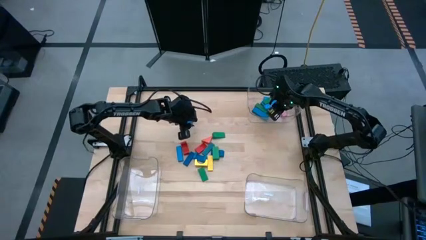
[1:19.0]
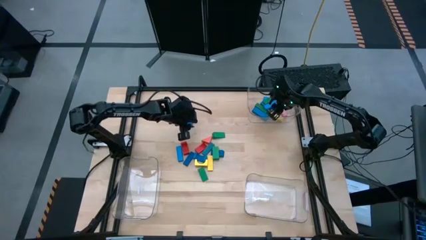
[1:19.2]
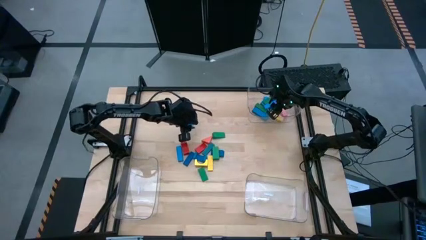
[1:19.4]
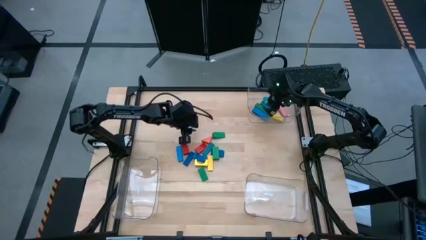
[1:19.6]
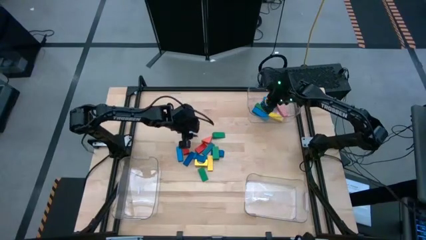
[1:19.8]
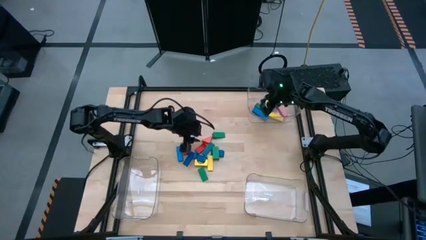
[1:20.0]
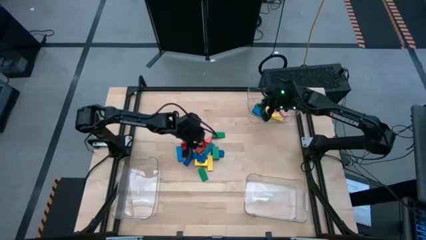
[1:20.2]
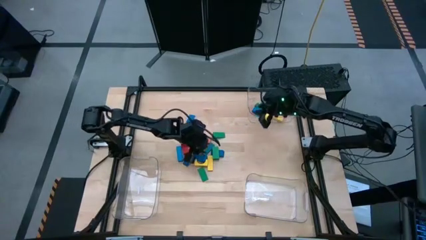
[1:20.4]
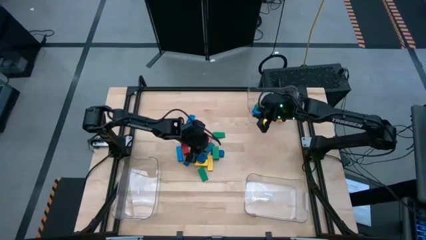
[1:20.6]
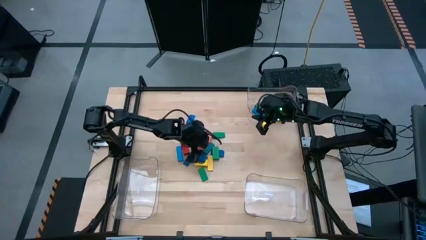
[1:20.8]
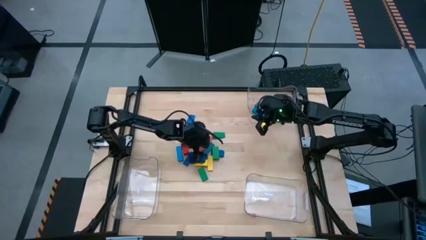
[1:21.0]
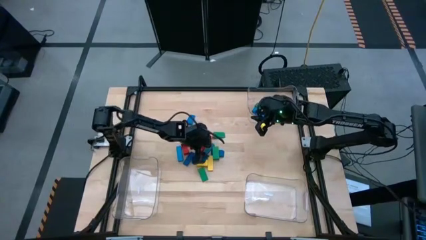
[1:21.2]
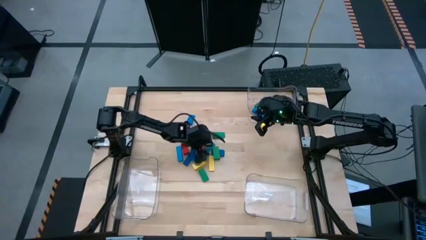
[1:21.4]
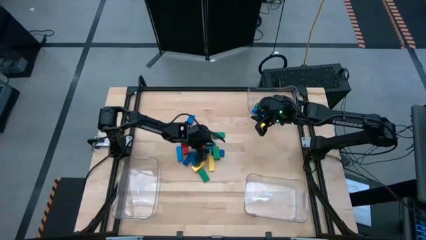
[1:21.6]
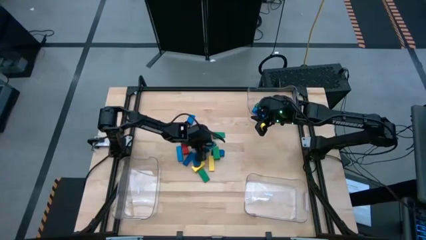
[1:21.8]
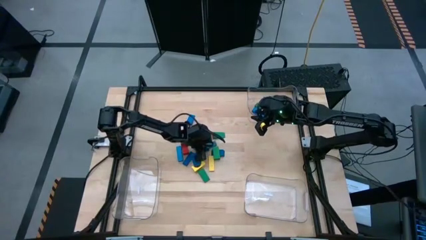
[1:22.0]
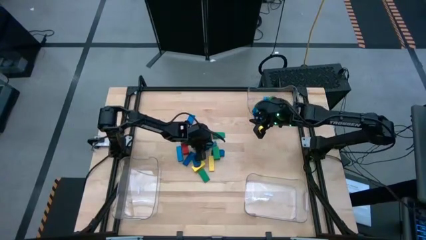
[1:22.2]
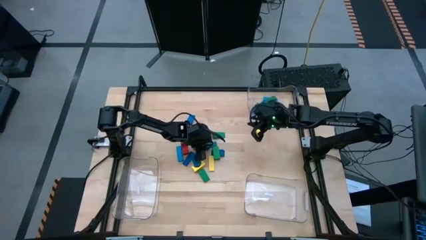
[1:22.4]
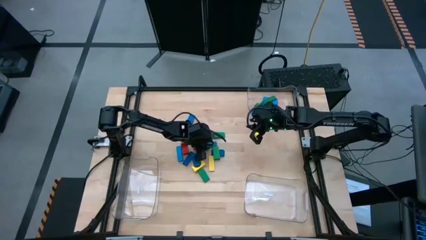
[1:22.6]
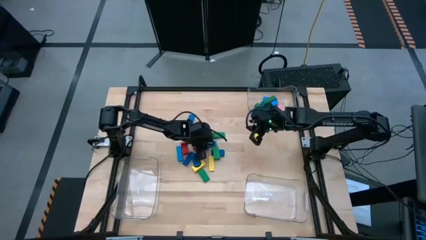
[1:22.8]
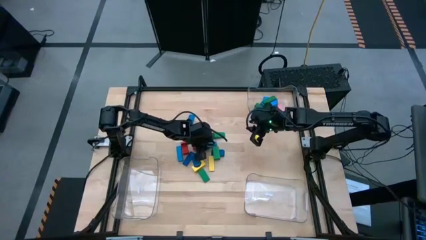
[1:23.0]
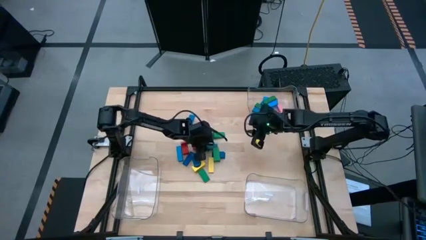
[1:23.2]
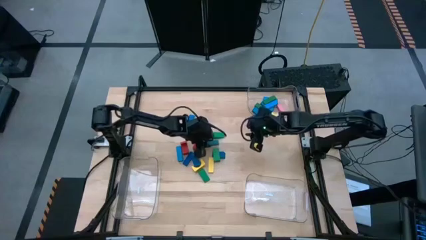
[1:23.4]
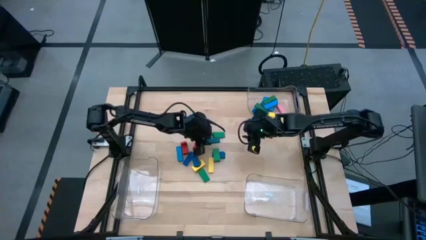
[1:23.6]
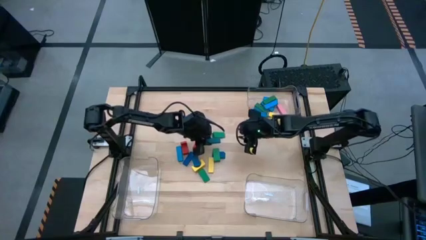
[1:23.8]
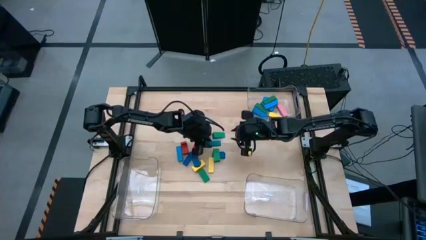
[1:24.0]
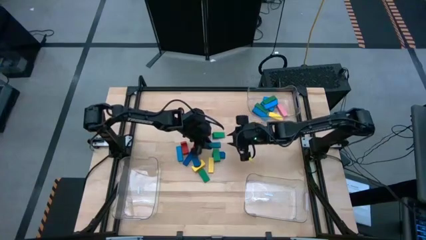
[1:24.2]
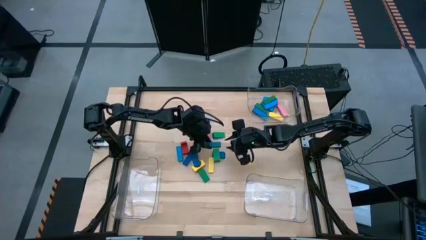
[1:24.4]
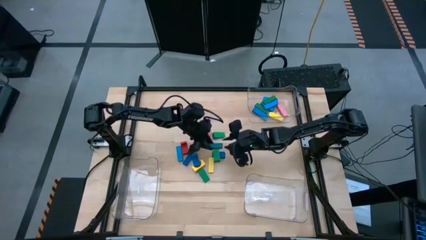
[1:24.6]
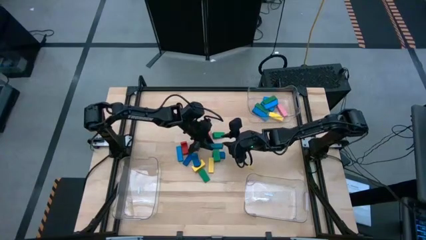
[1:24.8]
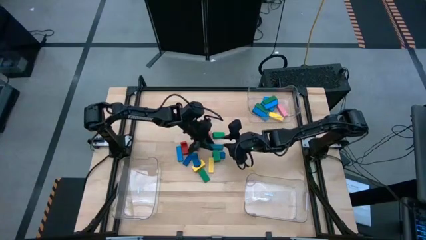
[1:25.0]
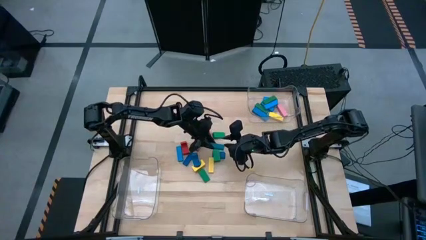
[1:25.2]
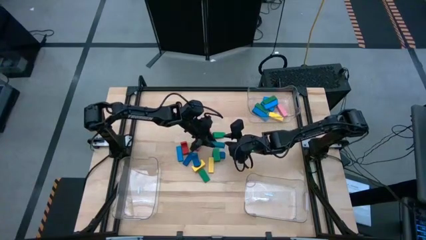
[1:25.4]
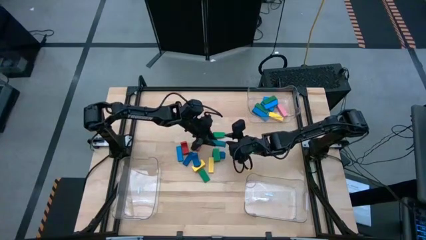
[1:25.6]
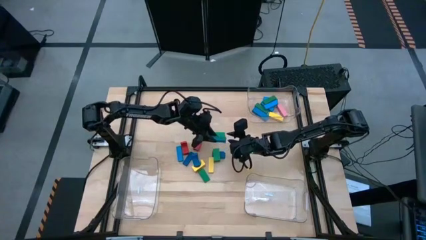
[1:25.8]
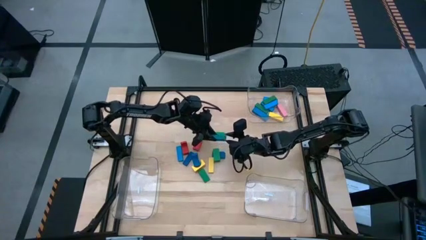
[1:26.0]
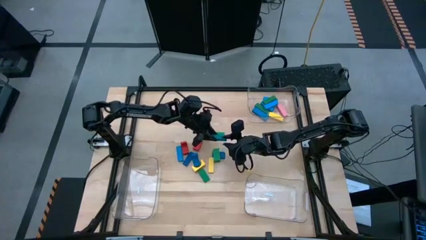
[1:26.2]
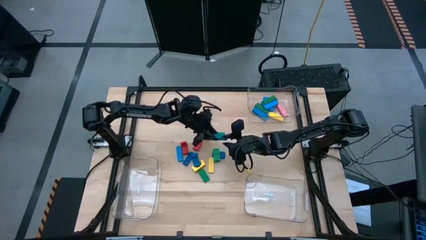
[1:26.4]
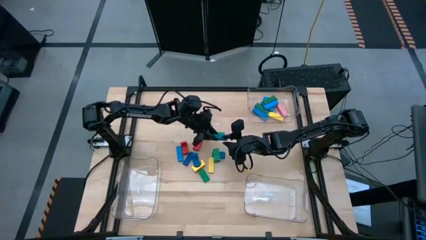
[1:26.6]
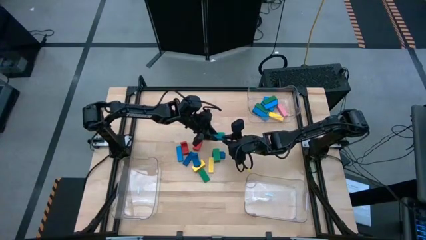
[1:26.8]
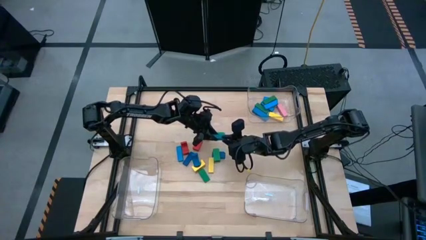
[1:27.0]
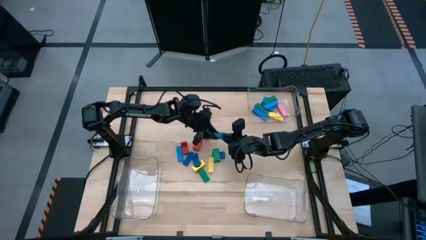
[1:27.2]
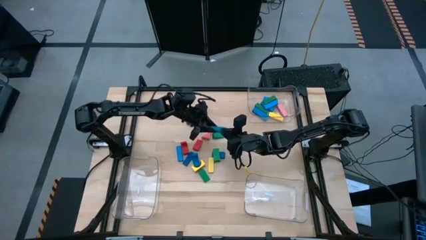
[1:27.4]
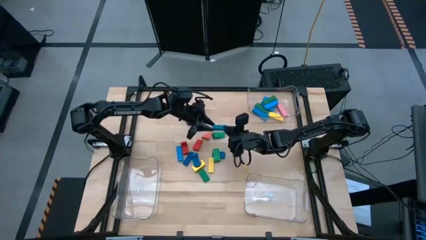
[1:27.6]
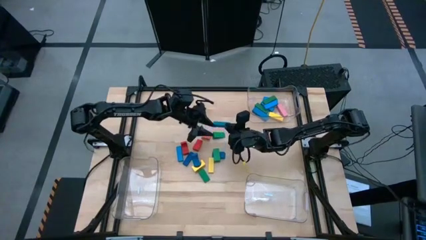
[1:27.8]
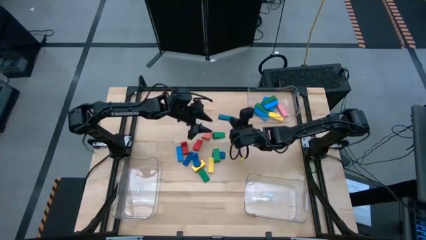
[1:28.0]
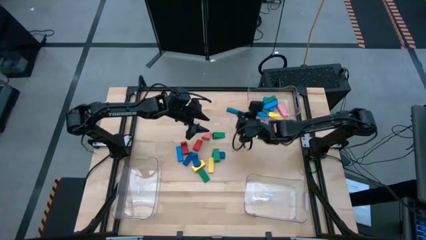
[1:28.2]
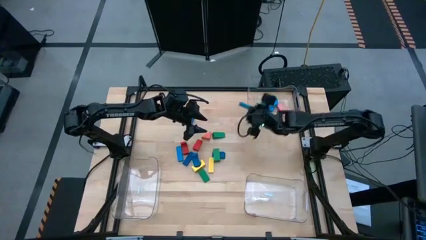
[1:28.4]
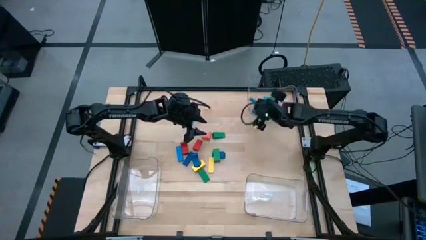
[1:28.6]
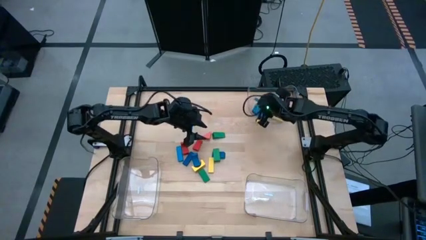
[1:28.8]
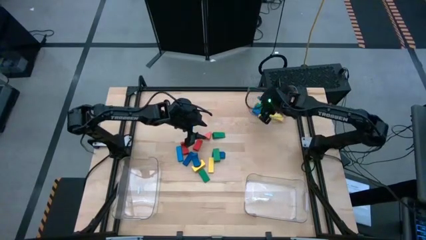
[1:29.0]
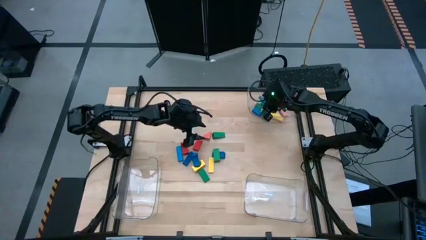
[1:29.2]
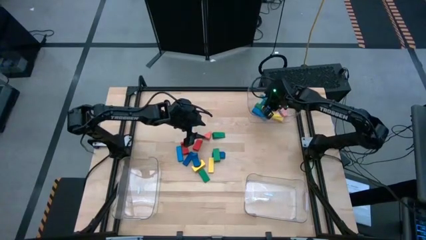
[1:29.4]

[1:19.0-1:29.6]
Task: Sort blocks by size
Put the blue rectangle block into the top transparent bin
